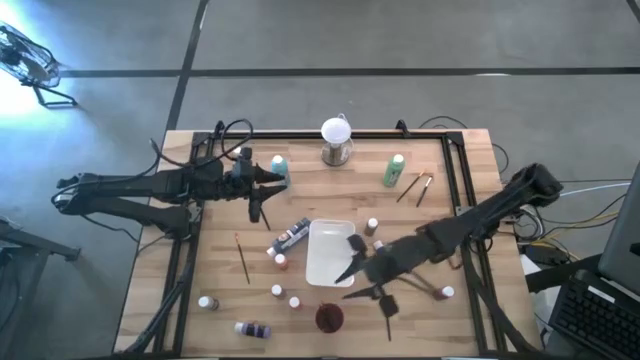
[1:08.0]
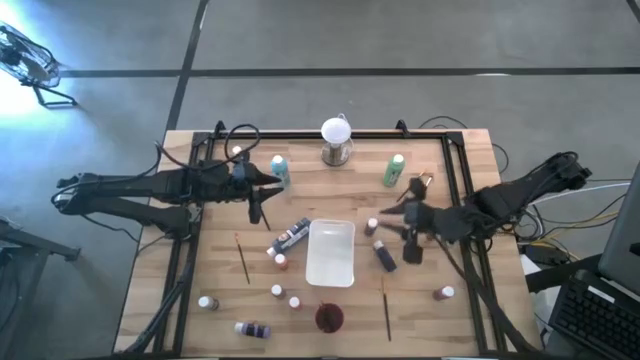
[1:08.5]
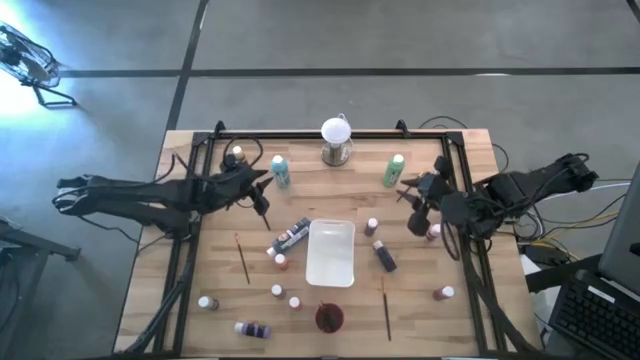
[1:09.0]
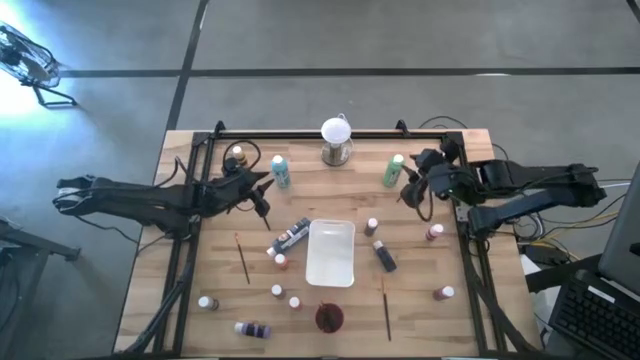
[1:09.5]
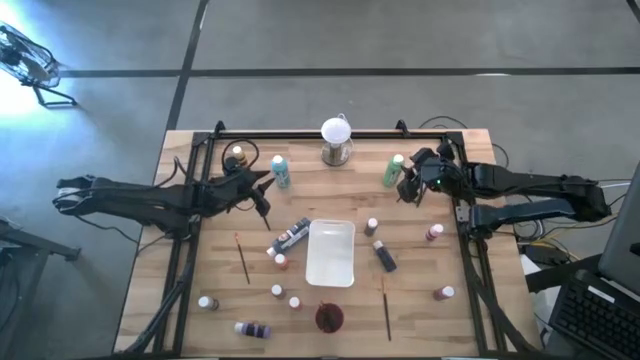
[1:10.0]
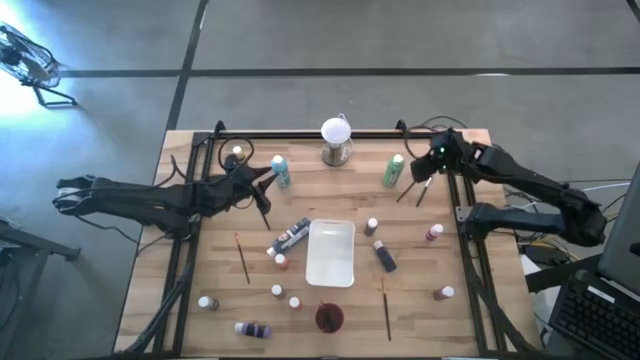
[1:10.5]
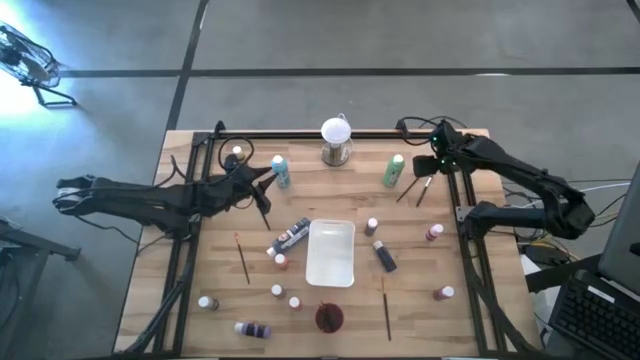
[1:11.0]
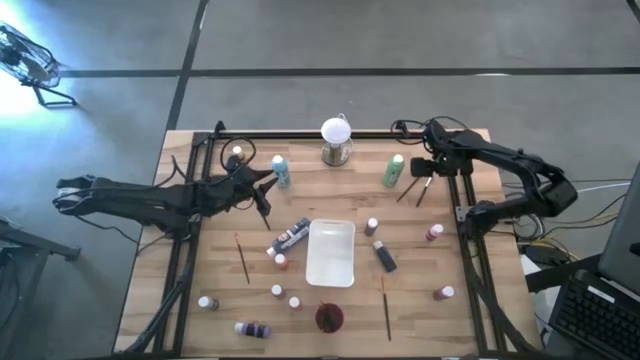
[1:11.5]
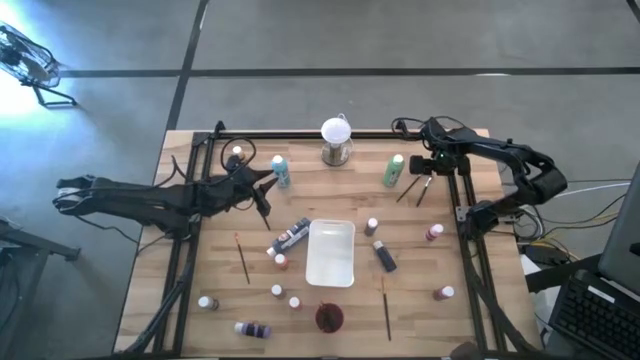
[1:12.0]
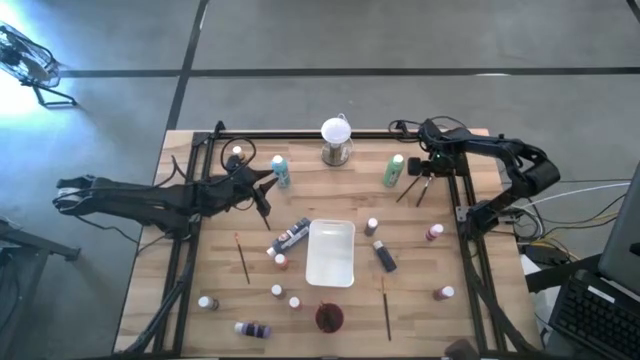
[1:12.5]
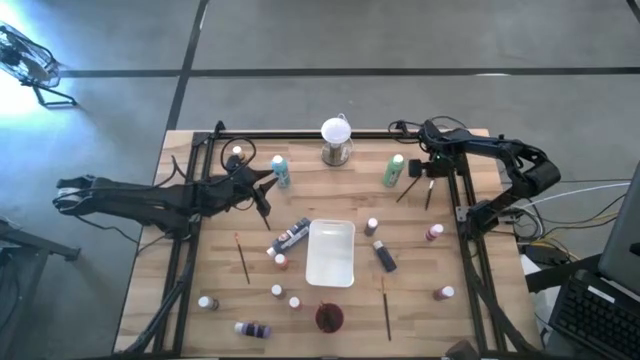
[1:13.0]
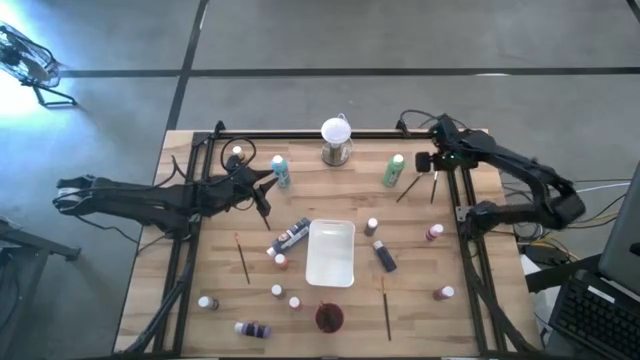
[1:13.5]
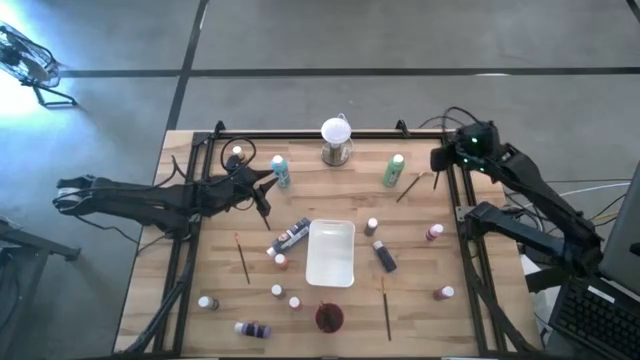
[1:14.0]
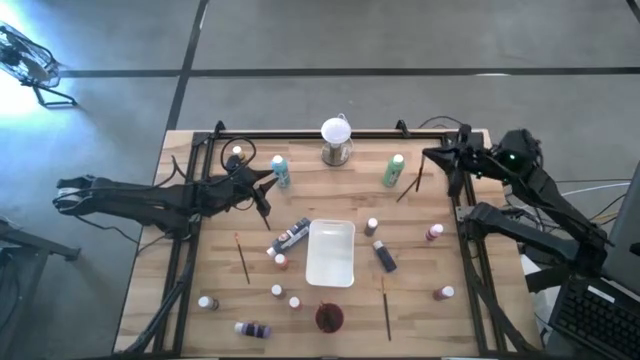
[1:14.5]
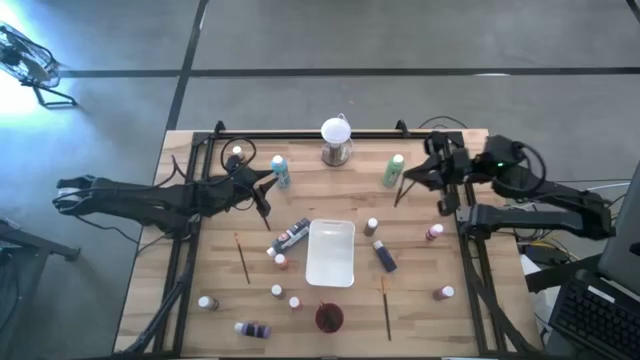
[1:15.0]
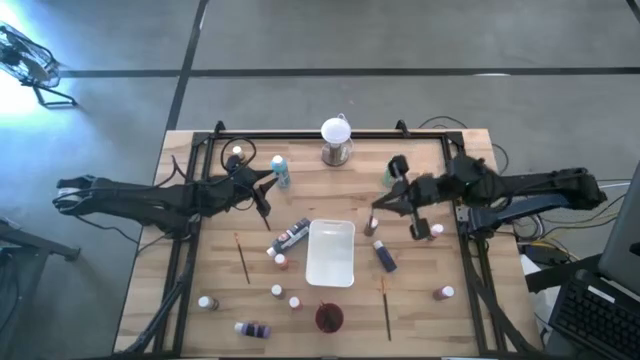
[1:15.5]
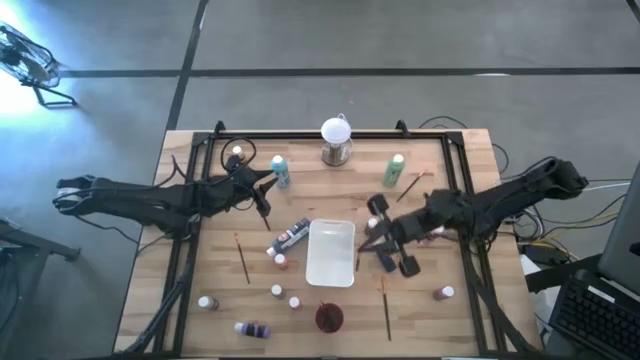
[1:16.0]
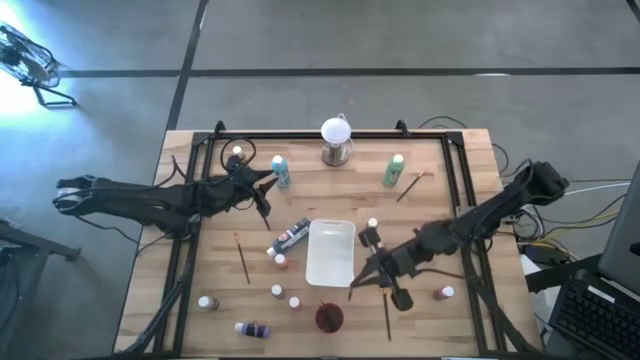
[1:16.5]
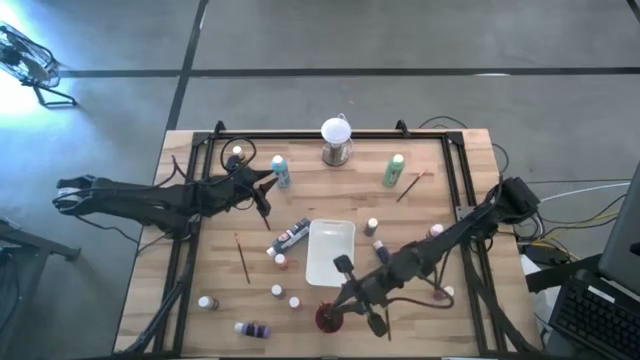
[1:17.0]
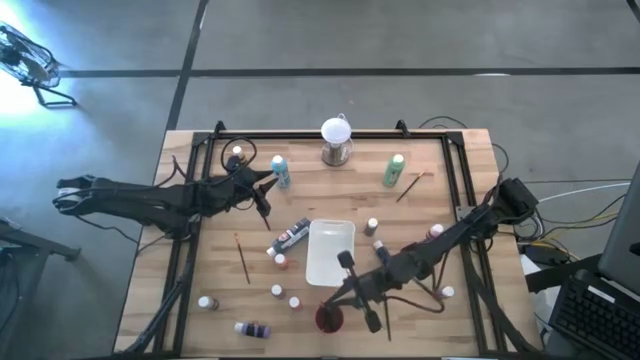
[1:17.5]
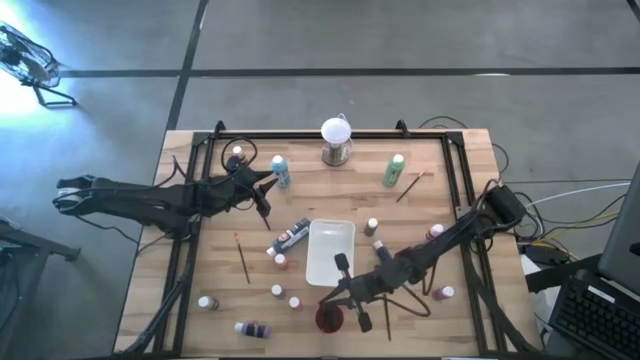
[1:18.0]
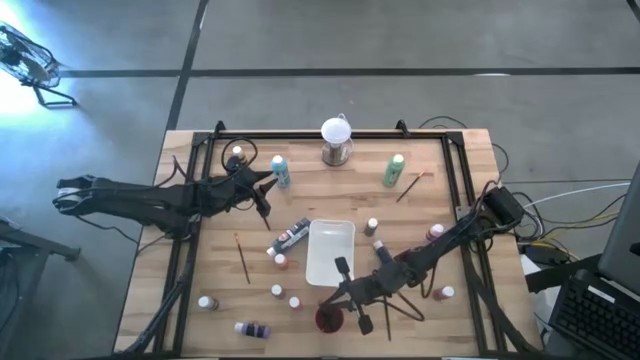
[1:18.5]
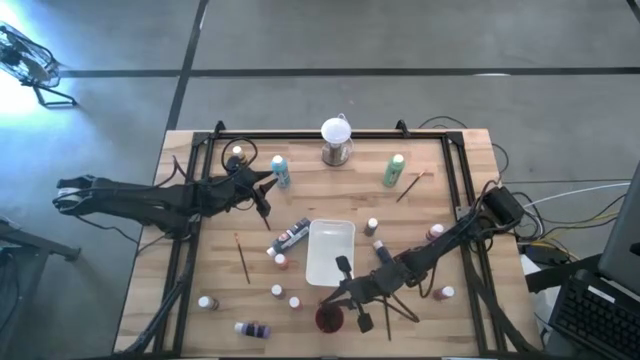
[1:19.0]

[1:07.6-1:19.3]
Task: Pick & Place Paint Supplies
Put the silver paint brush into the red cup

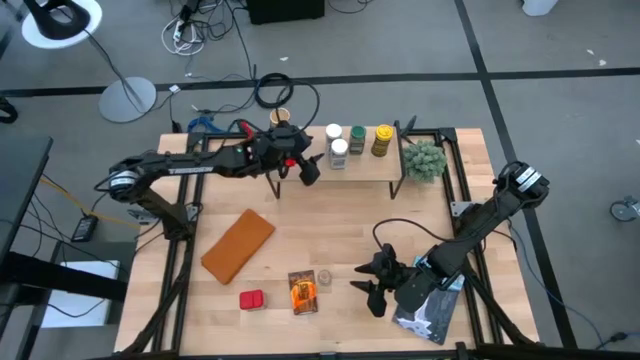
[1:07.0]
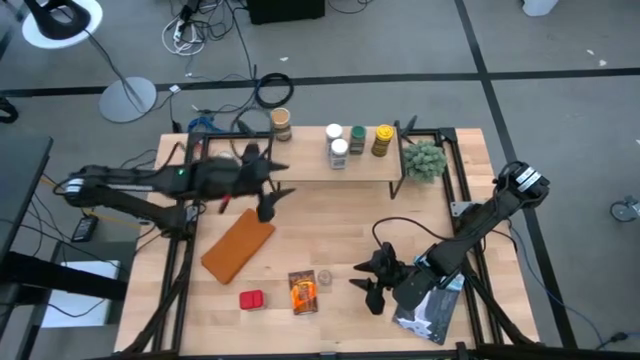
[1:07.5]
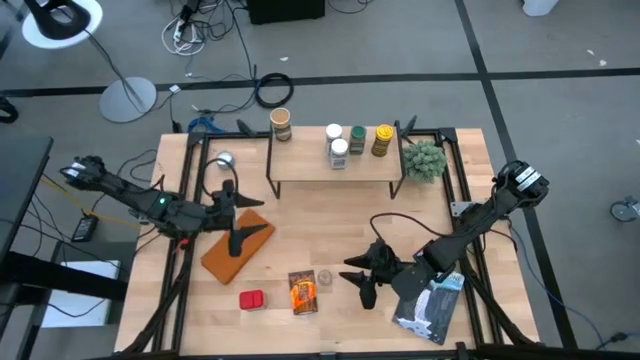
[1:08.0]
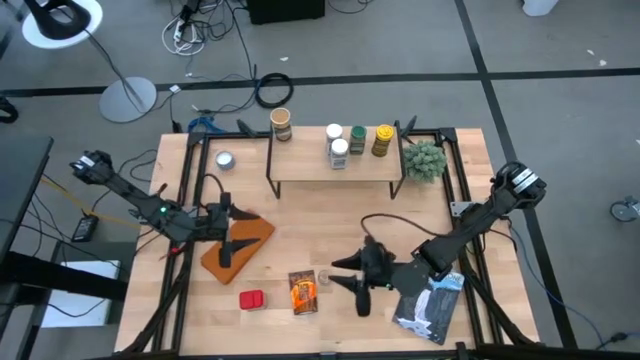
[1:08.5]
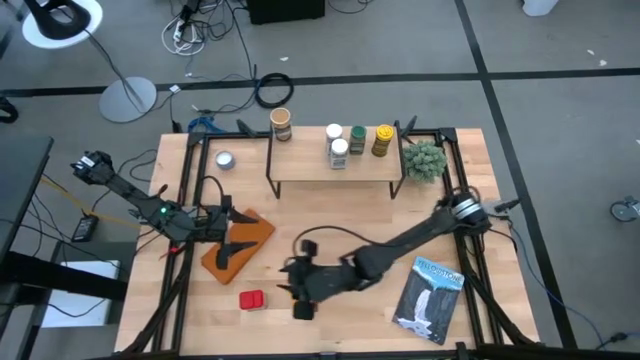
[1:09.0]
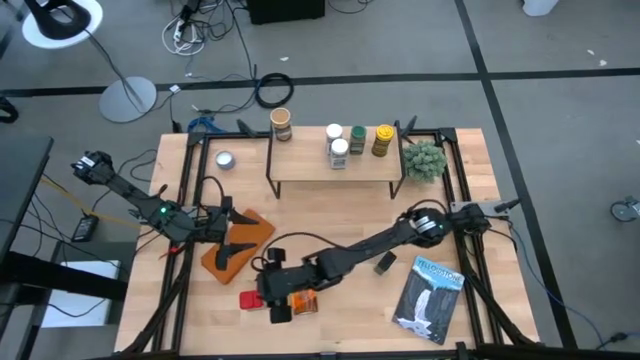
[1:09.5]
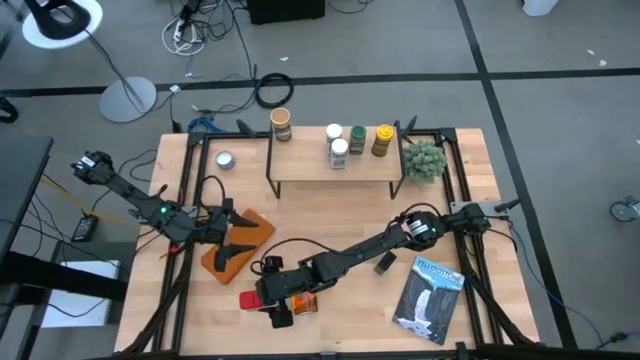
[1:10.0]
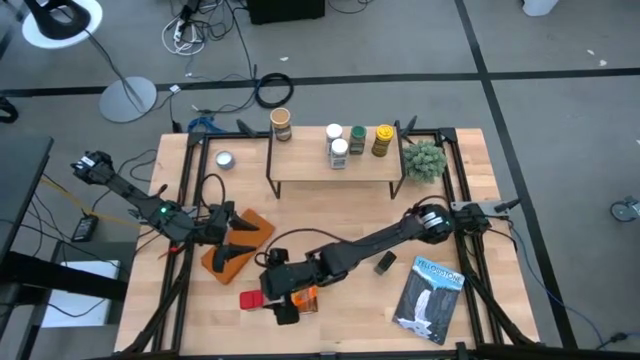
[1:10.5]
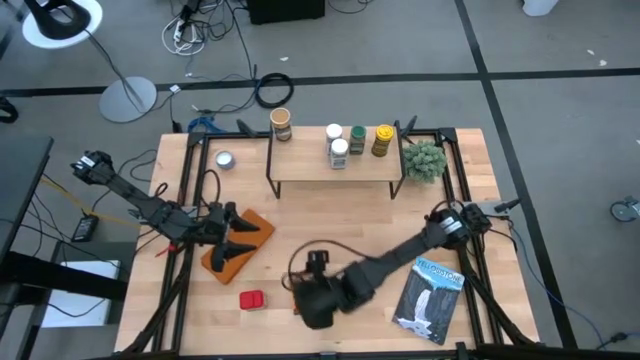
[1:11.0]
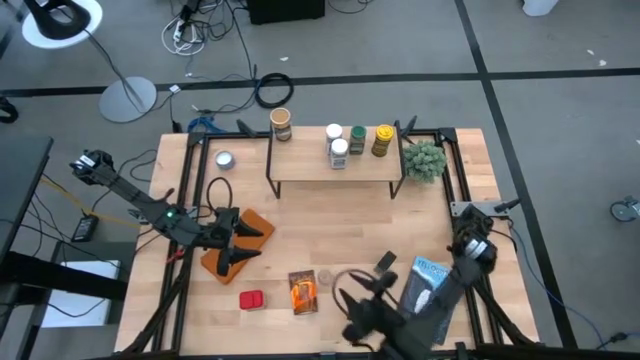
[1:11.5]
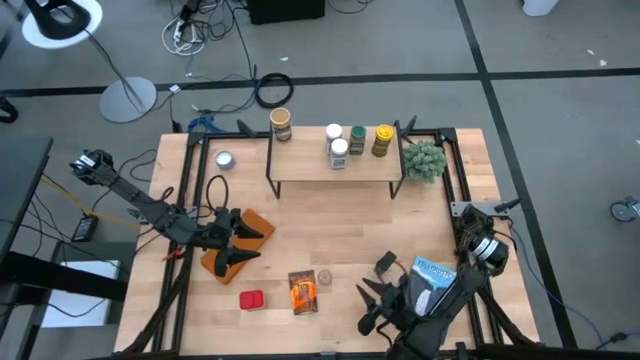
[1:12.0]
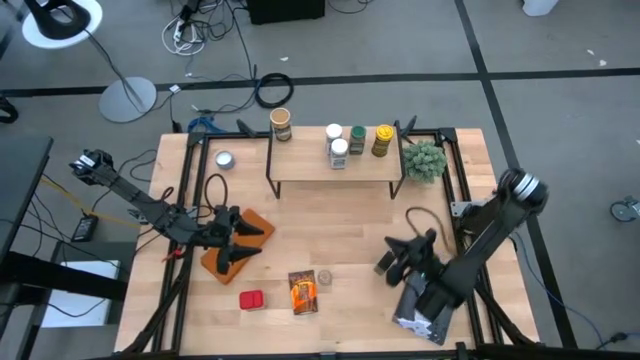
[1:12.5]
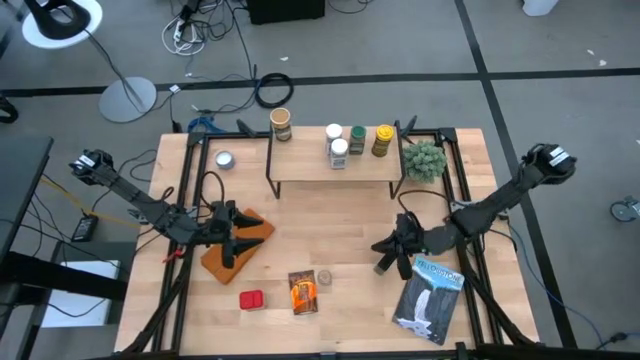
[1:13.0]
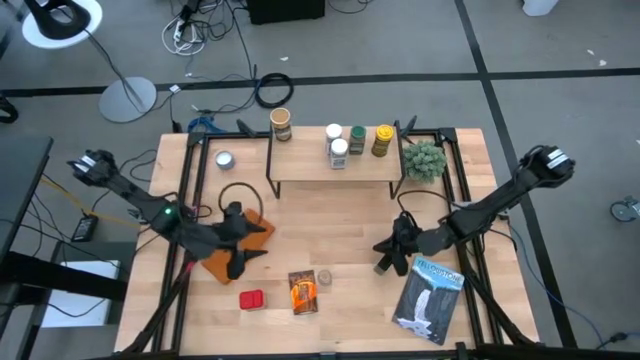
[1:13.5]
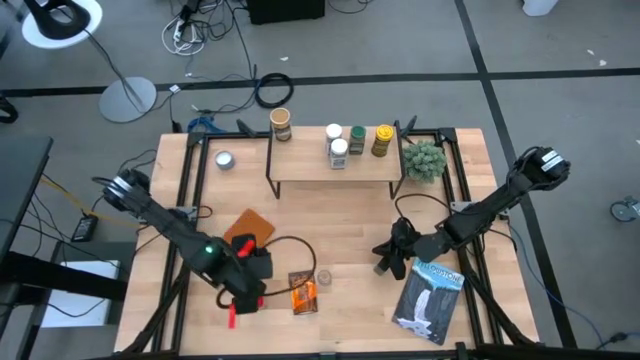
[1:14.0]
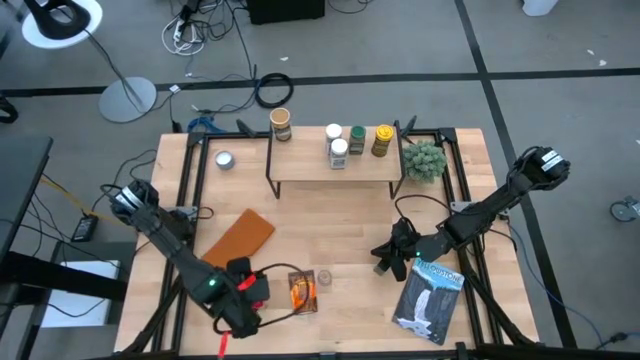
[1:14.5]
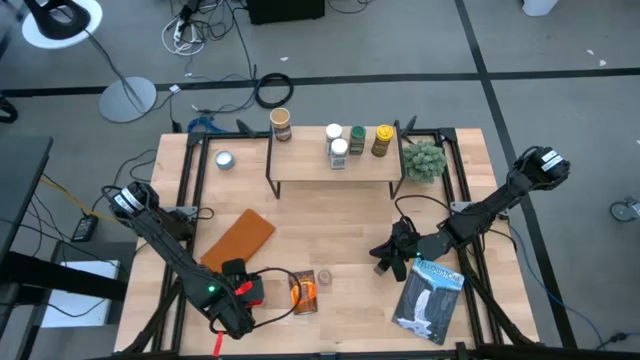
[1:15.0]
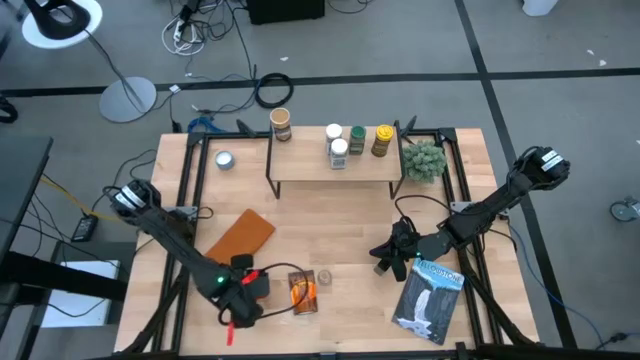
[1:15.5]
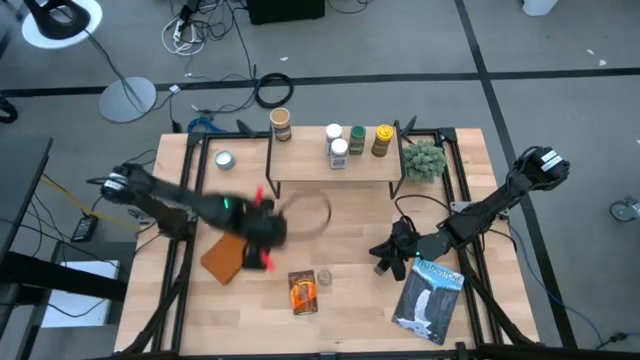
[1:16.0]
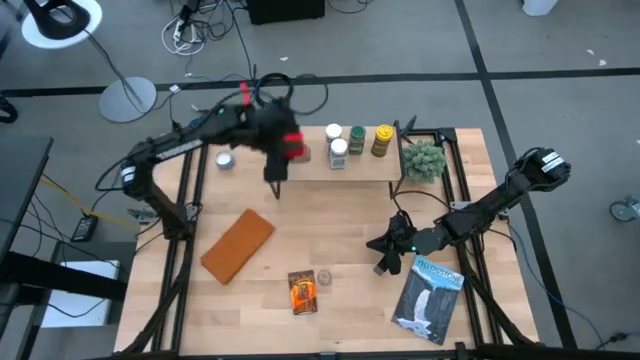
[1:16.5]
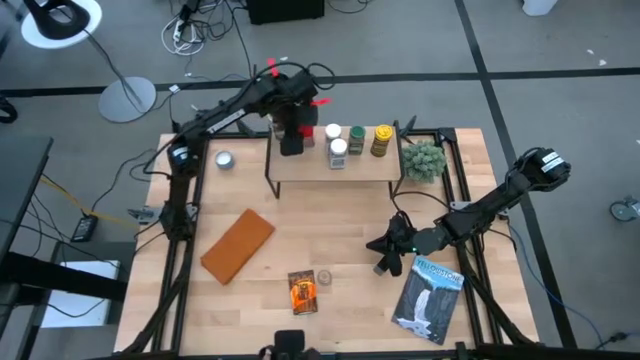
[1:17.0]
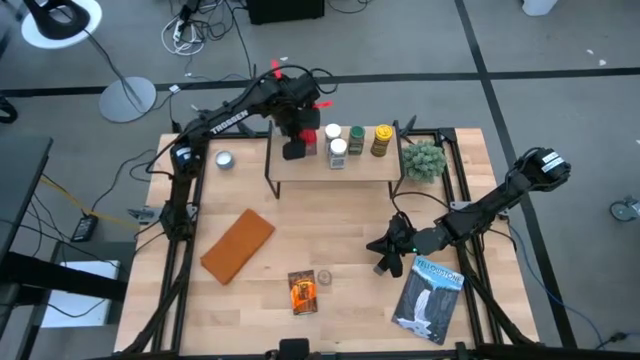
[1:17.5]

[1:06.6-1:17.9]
Task: Shelf spices
Put the red seasoning can on the shelf
